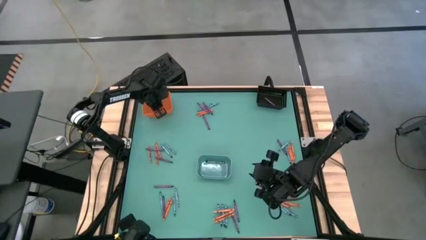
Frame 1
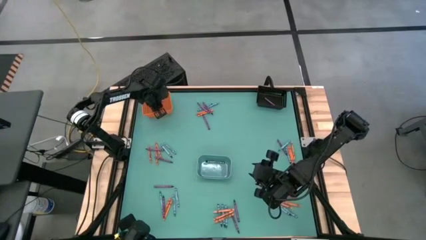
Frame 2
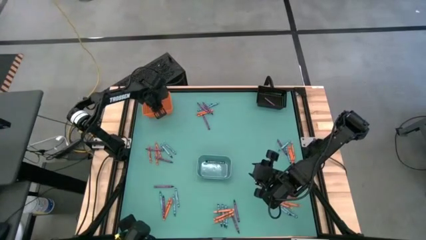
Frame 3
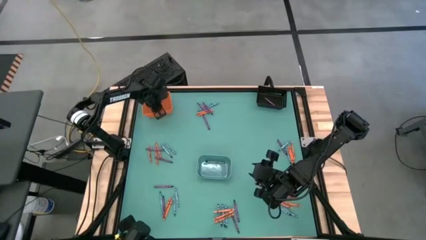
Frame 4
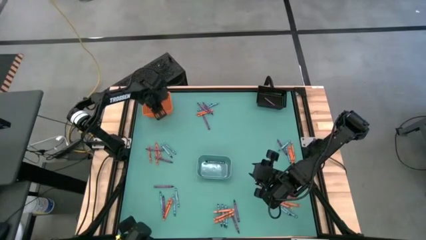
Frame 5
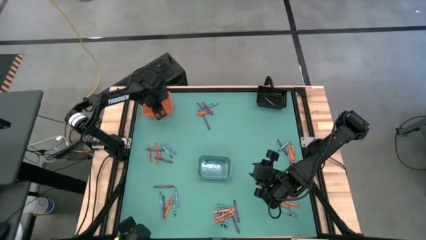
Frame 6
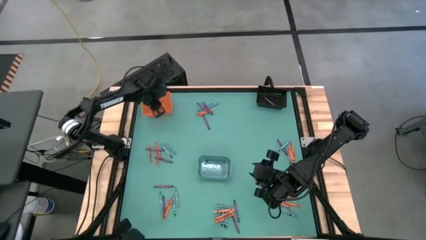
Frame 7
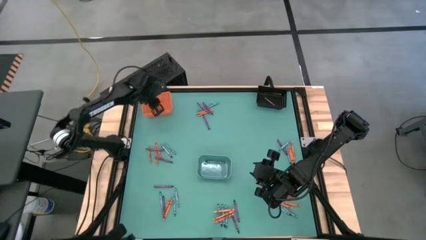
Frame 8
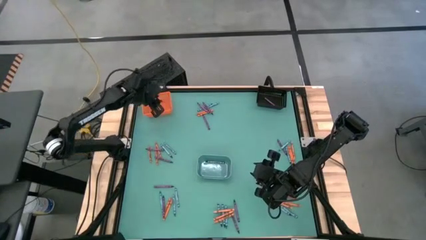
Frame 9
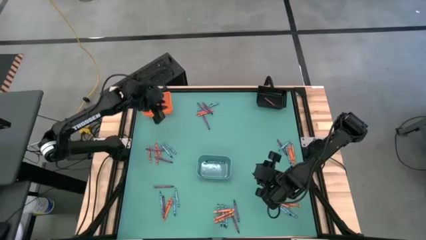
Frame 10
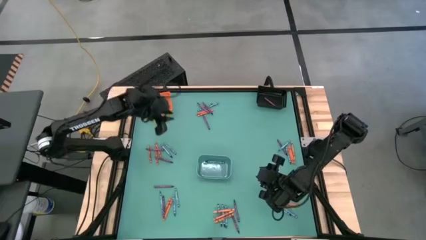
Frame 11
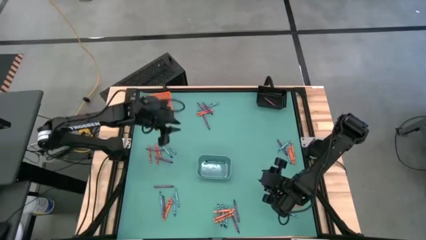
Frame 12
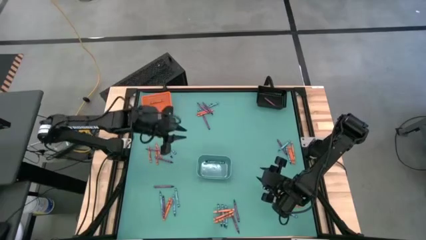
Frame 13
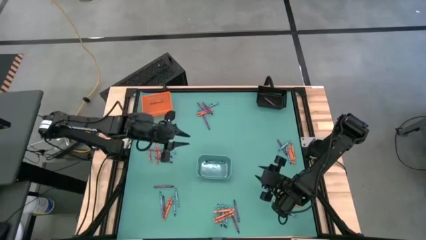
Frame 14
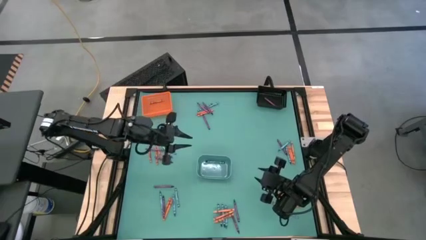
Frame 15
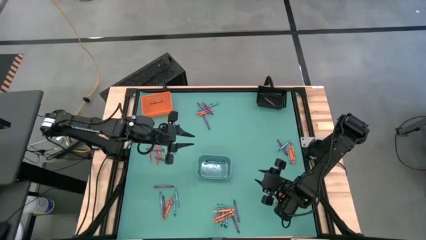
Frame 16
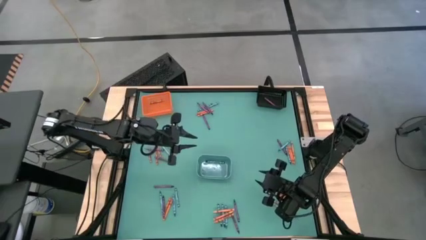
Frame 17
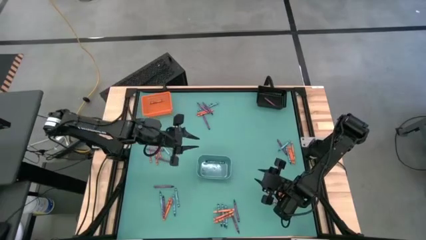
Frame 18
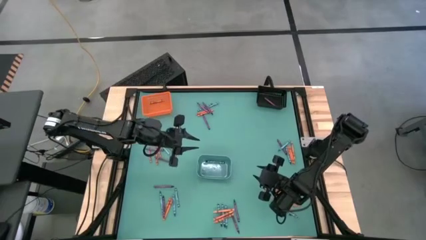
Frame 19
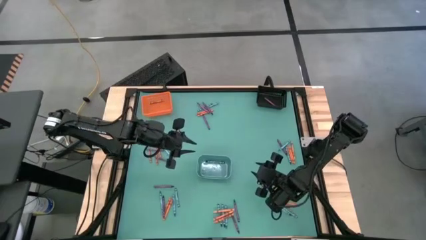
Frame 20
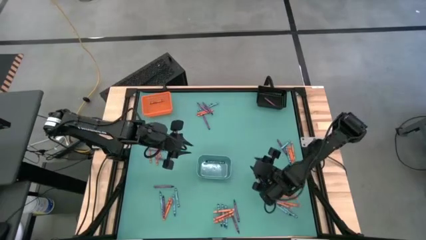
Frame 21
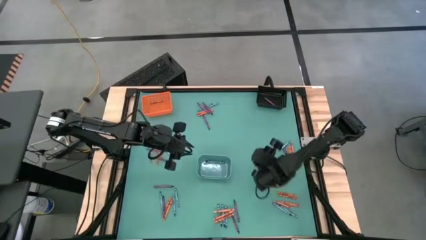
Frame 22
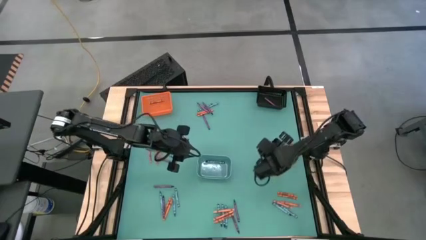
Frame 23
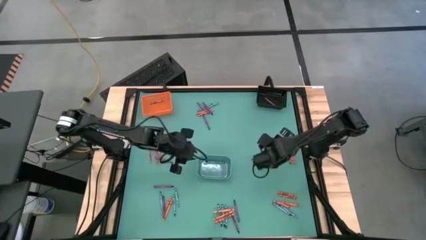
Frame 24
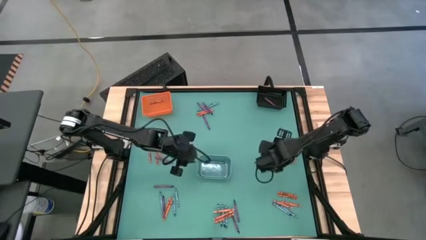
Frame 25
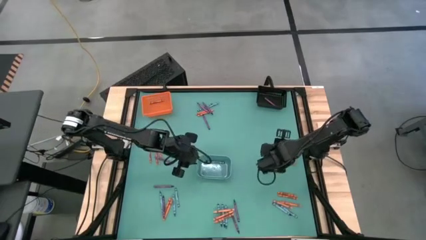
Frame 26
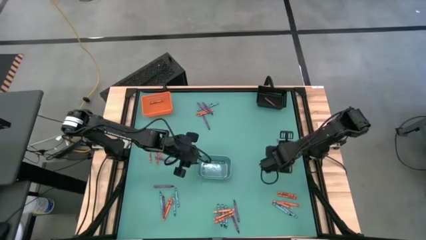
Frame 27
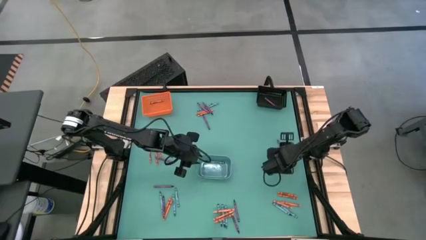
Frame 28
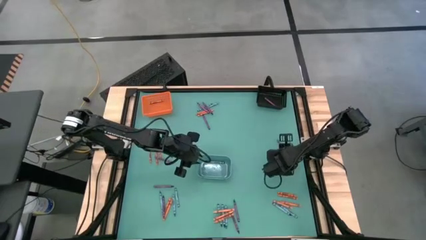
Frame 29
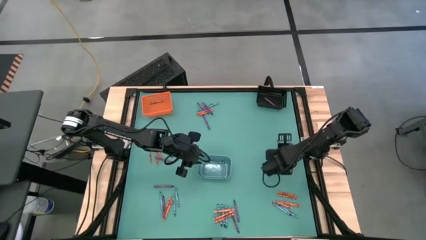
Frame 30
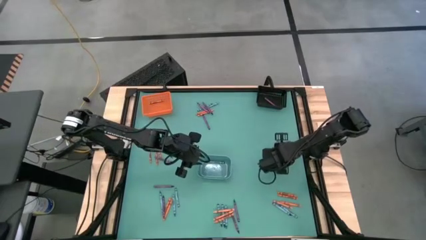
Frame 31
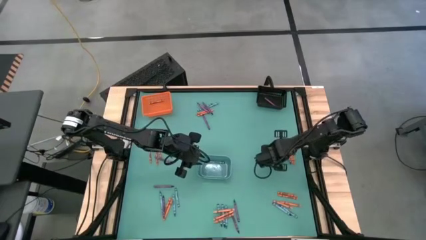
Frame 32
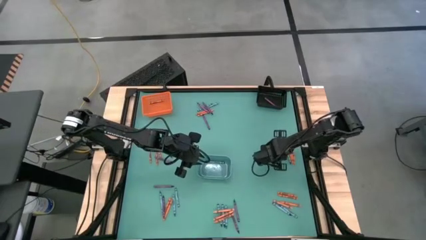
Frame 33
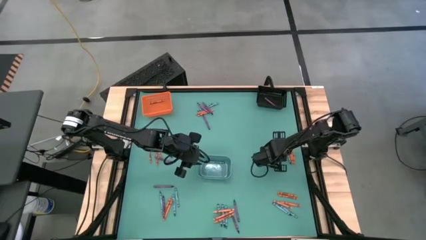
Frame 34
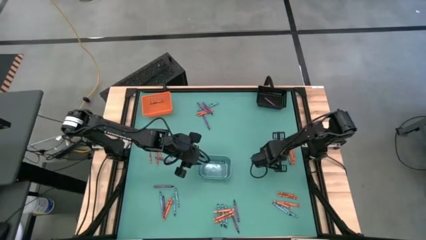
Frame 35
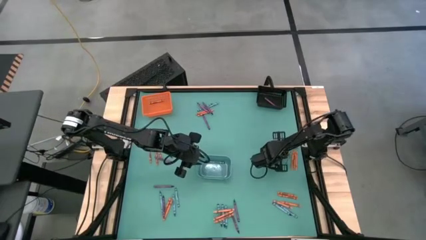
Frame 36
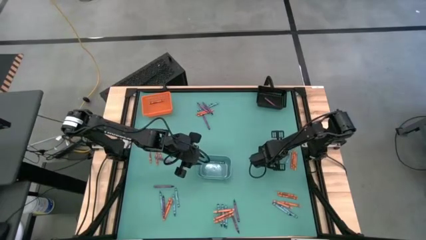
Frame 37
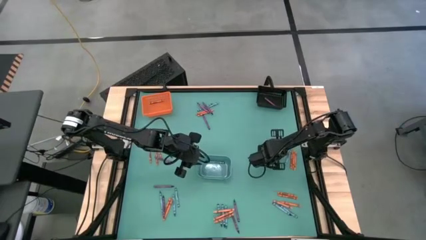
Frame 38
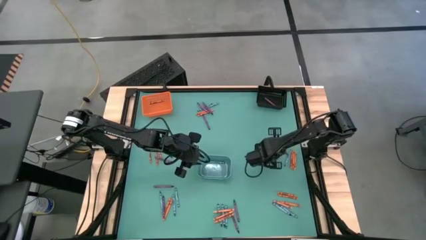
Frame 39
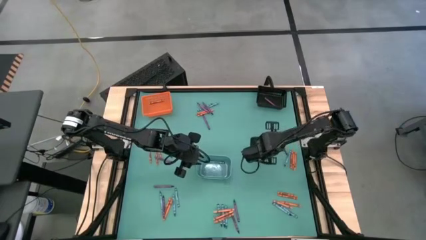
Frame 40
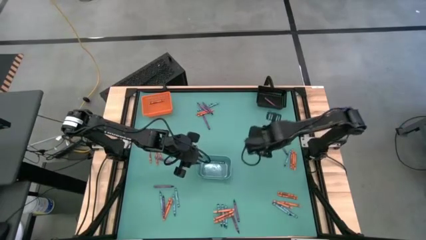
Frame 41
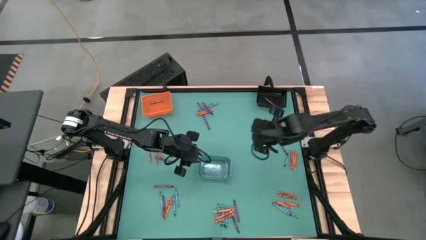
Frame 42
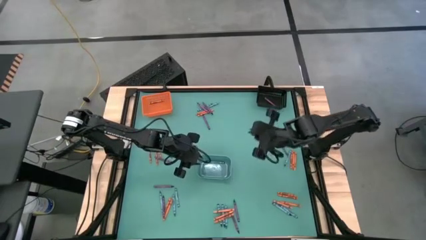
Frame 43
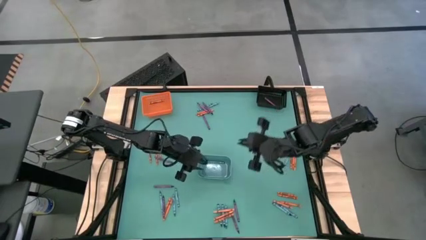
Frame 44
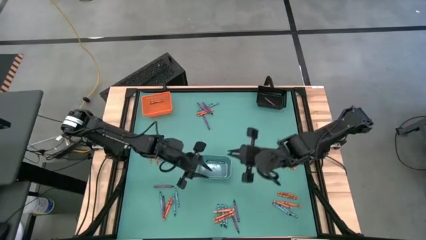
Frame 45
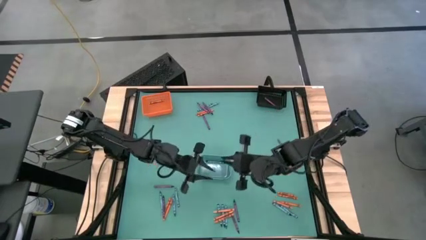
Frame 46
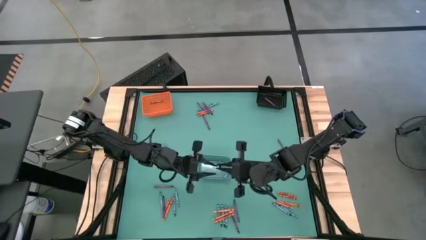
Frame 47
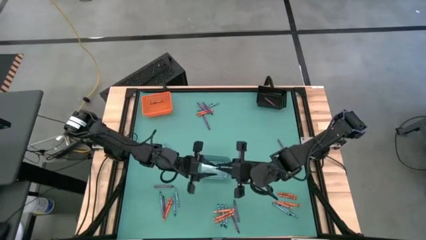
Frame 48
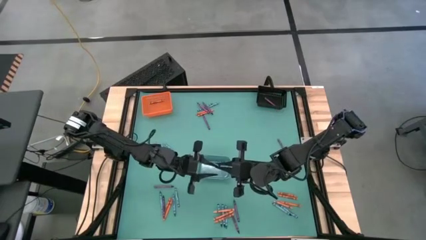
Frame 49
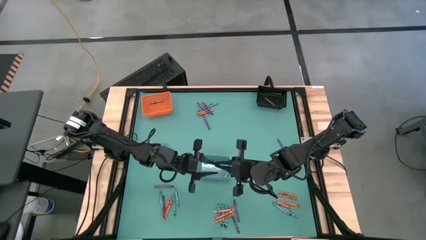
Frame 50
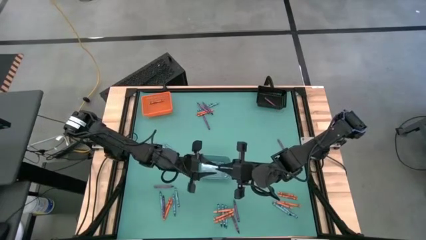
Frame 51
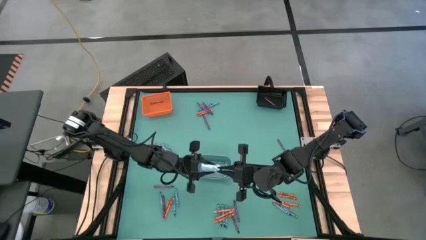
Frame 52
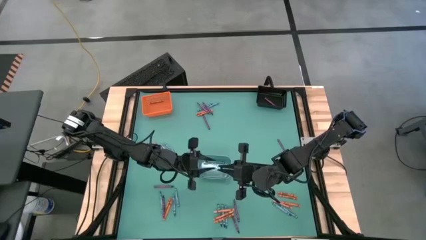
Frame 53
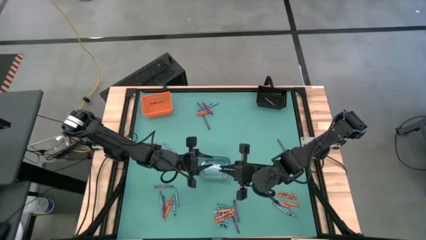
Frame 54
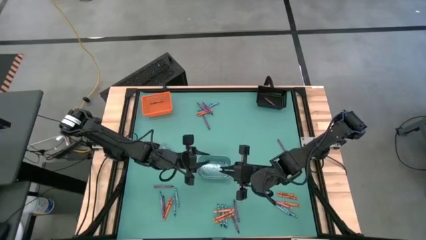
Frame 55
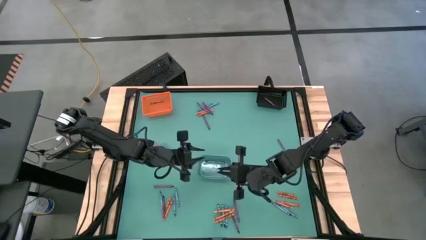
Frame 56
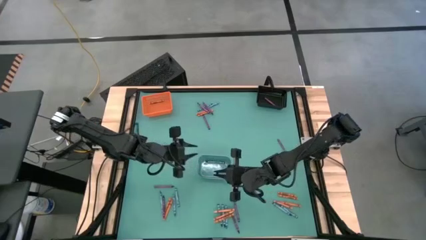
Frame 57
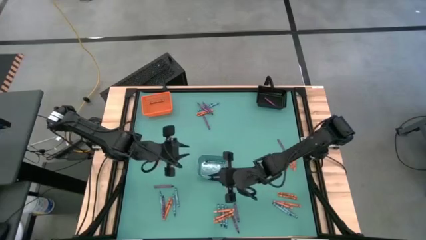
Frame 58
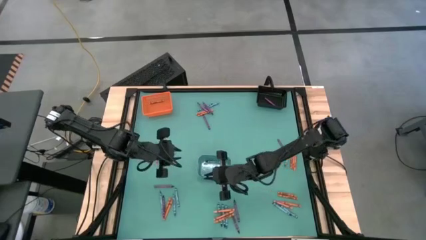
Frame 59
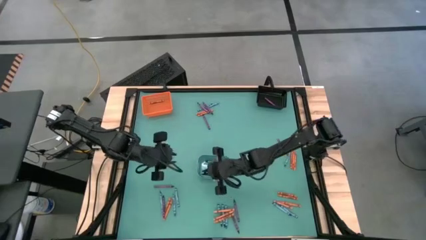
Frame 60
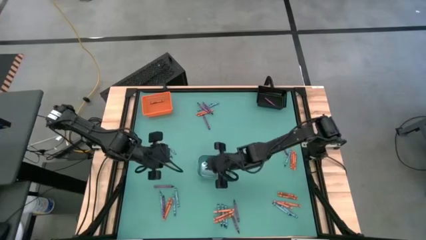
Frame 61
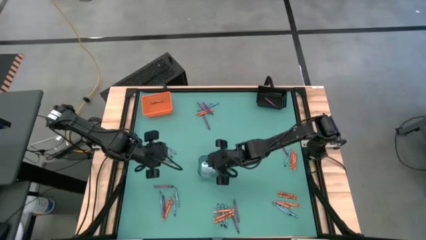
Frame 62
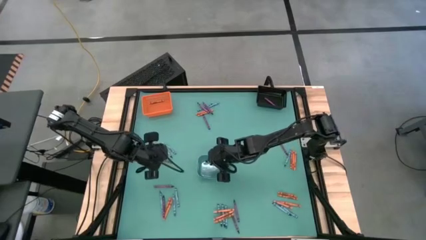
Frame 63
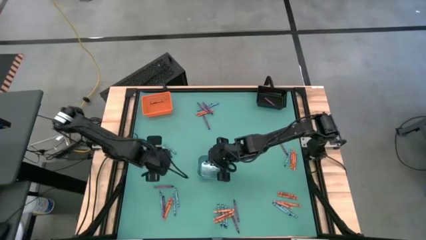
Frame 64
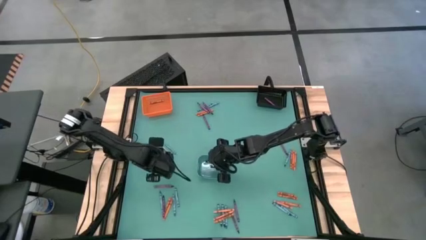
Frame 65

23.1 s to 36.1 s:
Task: Sort crayons
Put the light blue crayon into the blue bin

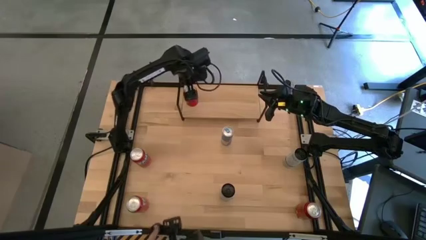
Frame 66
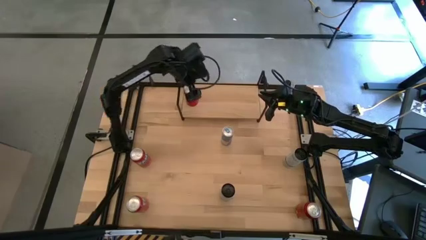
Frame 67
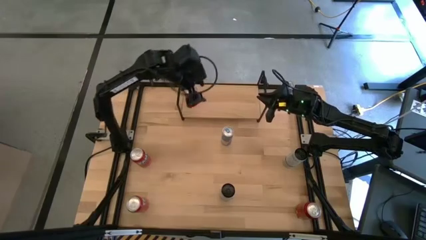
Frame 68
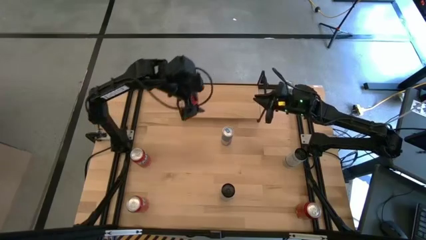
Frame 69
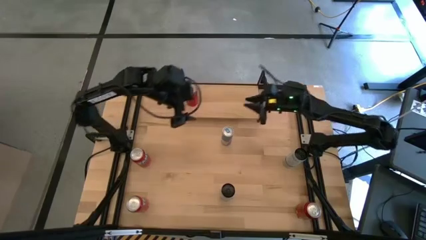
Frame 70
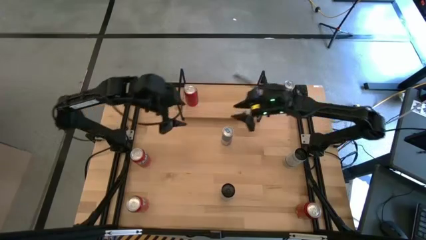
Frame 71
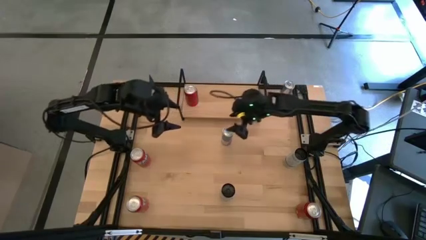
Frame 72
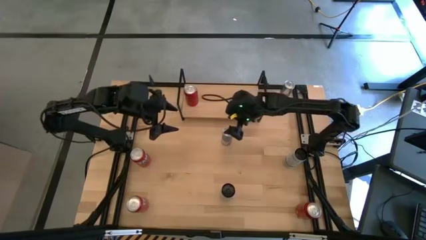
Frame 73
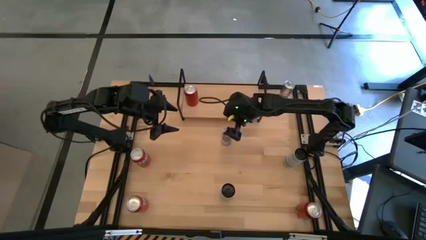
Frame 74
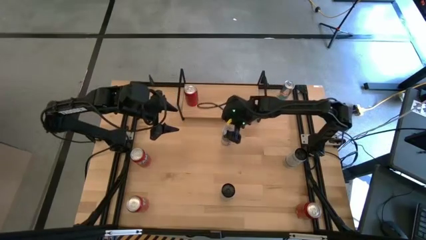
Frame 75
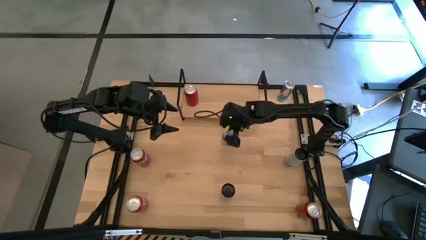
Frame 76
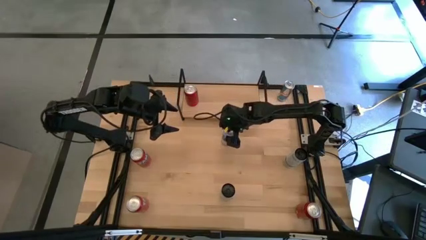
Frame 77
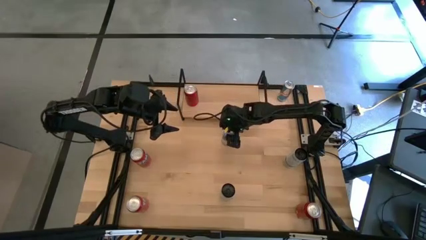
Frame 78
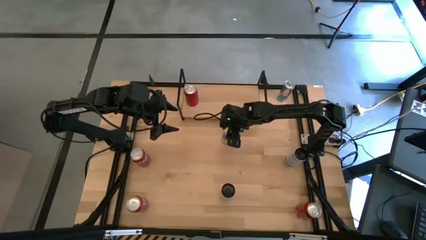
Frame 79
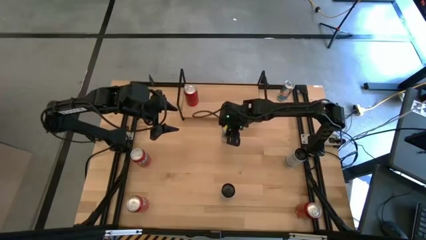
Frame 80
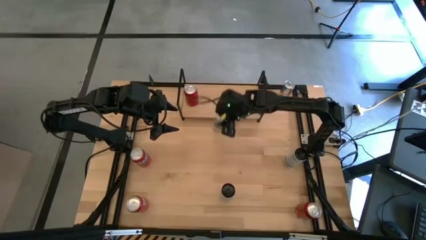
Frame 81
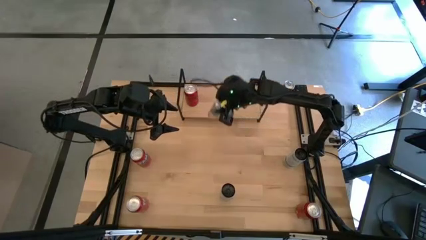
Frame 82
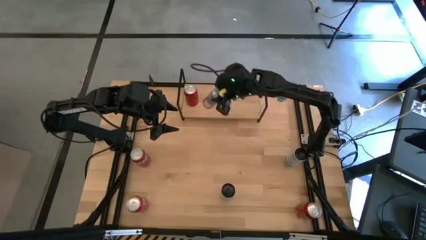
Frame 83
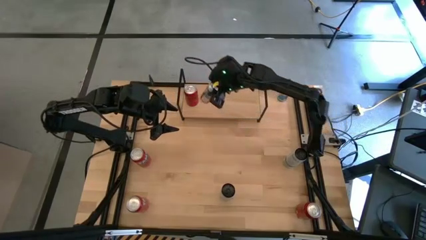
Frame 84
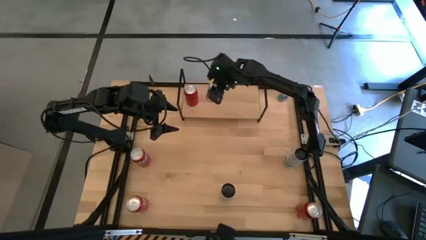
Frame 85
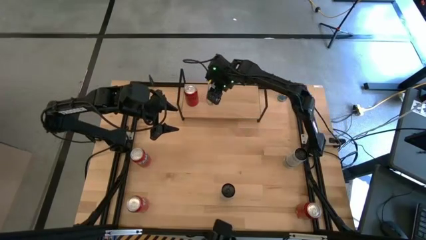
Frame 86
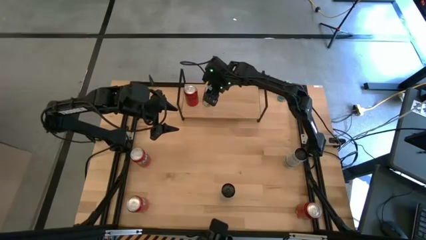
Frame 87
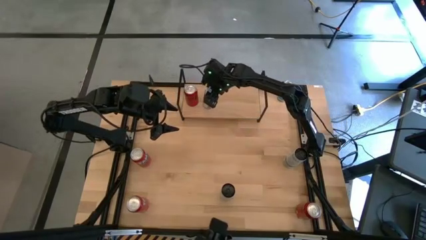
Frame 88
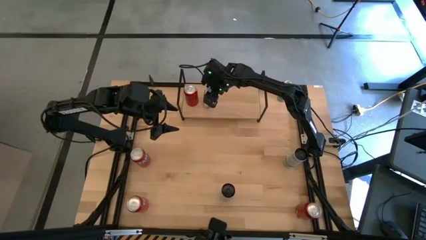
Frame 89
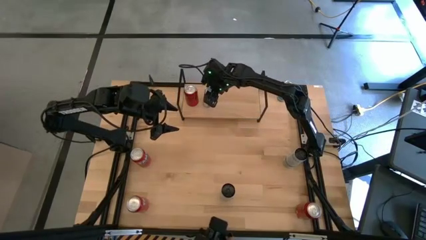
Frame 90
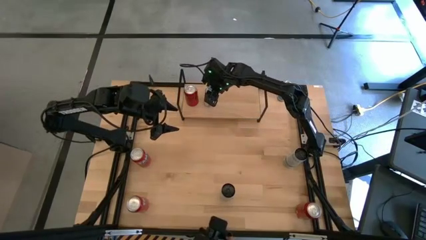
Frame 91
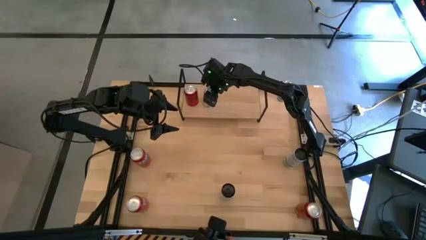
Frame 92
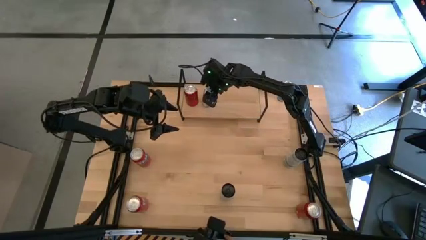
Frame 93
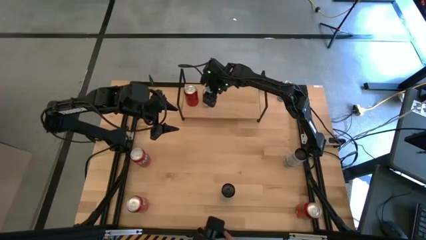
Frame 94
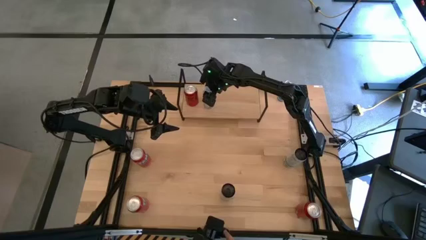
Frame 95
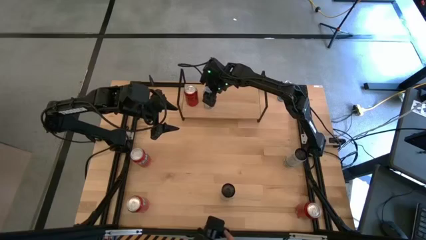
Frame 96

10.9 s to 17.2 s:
Task: Place canned beverage on shelf
Put the bottom blue soda can on the shelf
